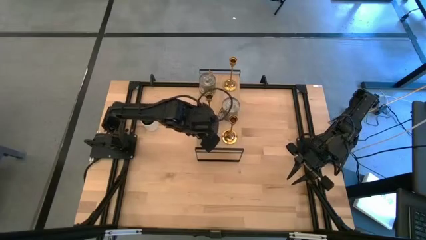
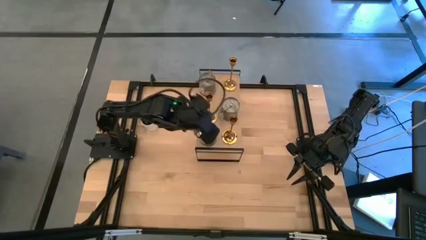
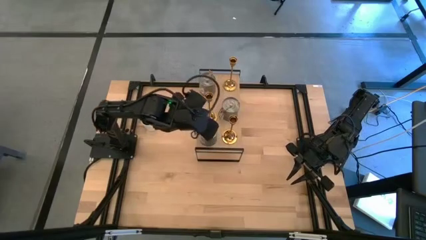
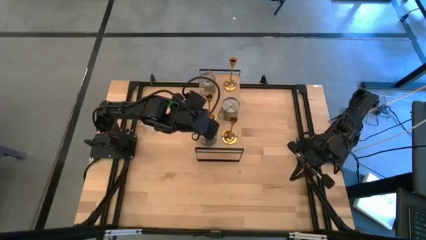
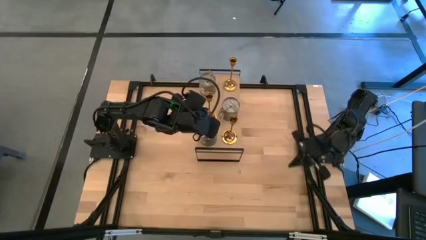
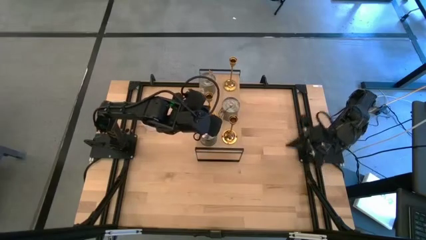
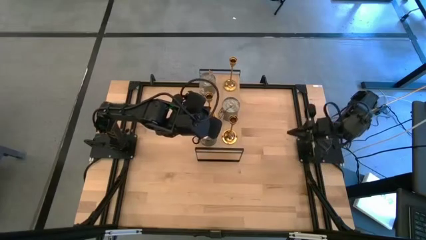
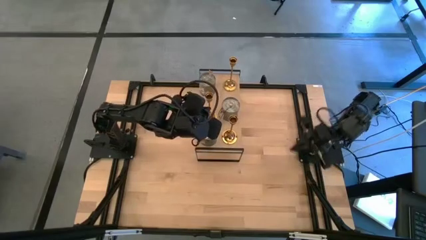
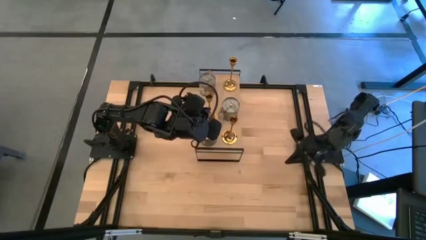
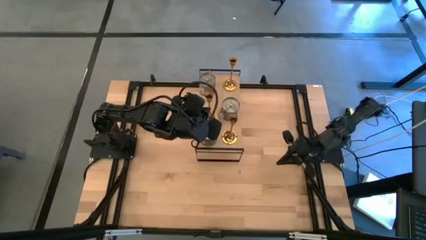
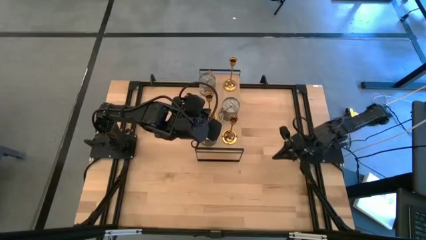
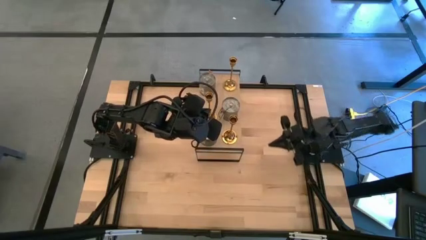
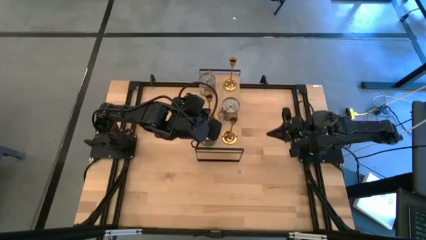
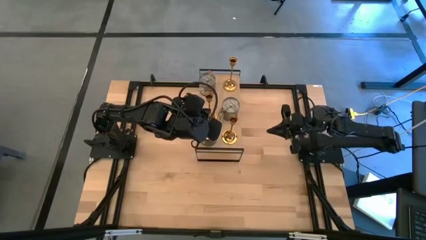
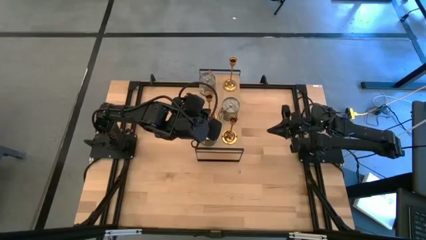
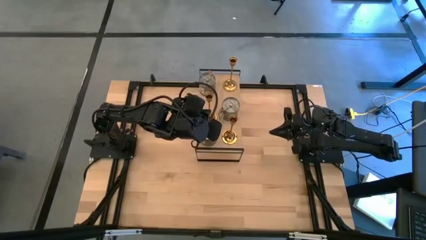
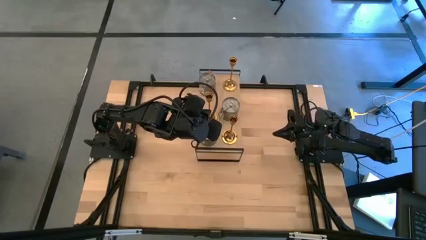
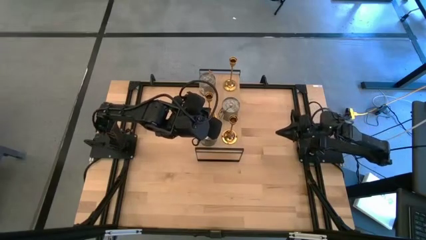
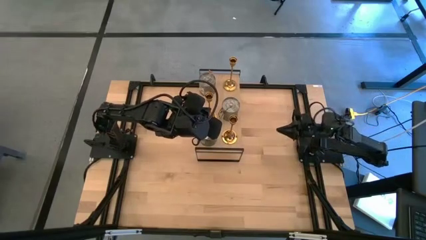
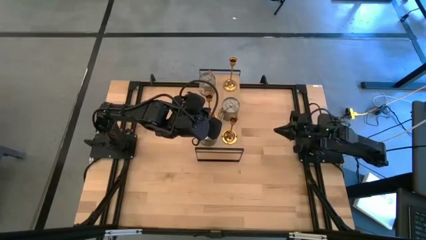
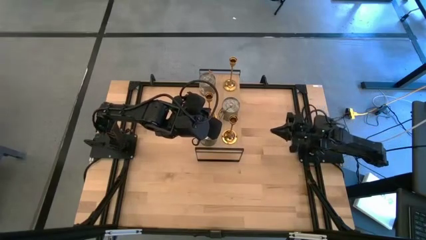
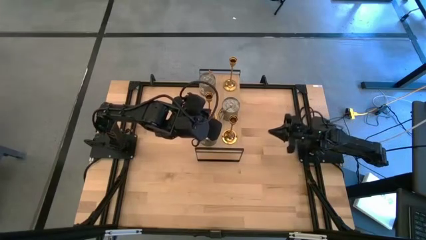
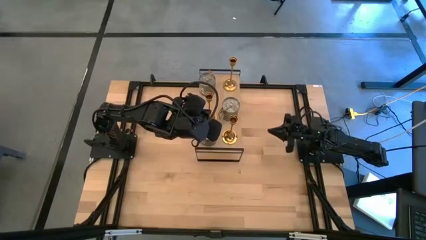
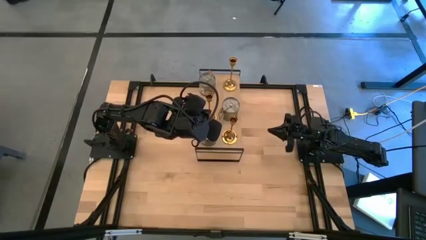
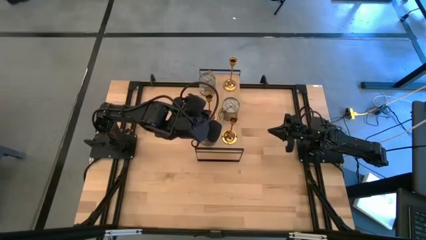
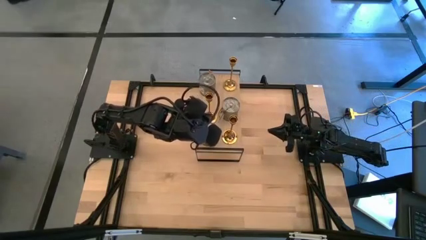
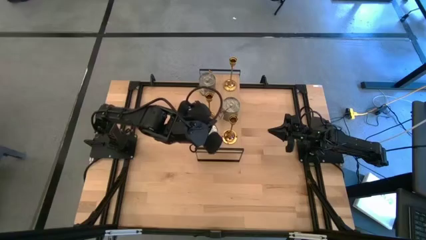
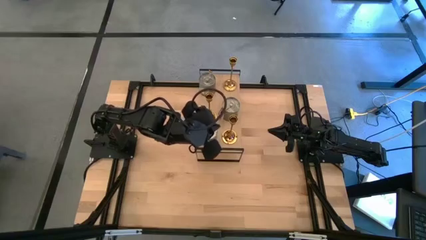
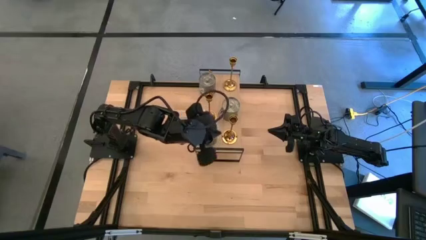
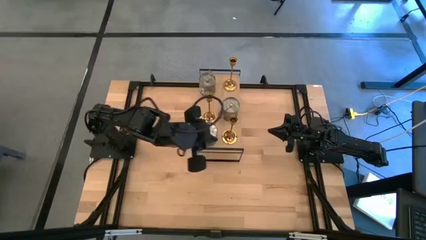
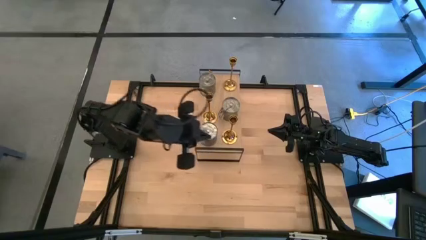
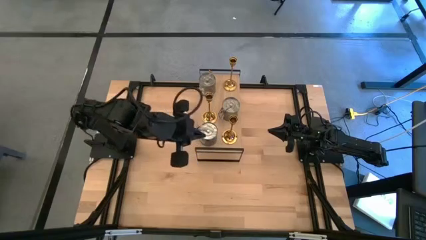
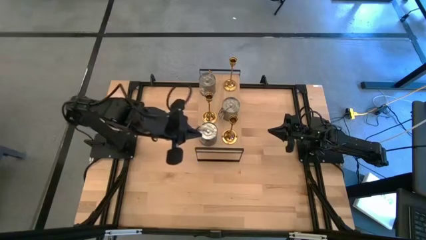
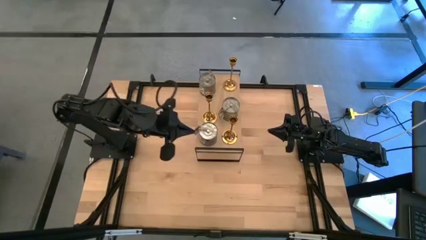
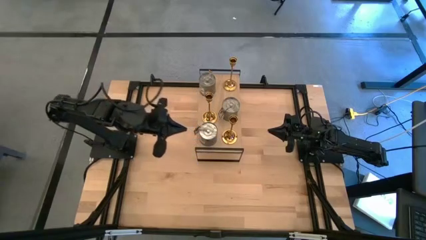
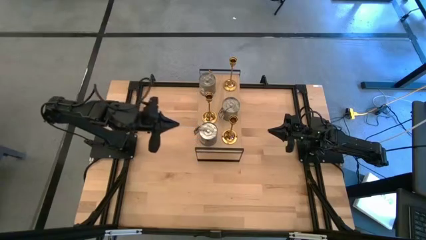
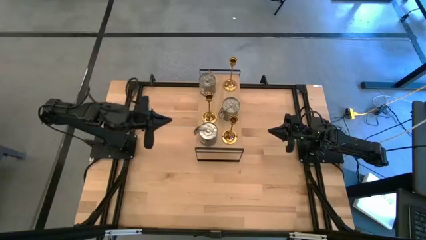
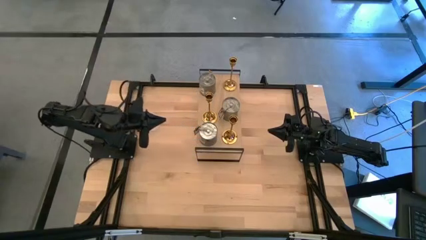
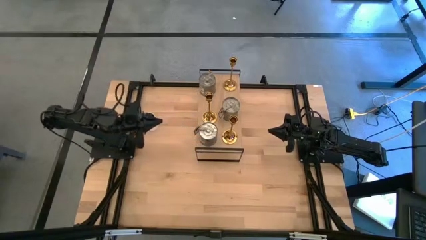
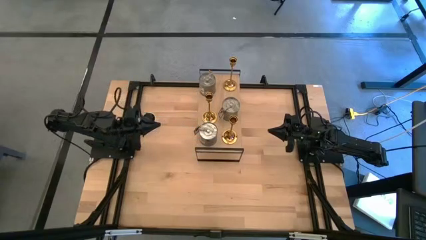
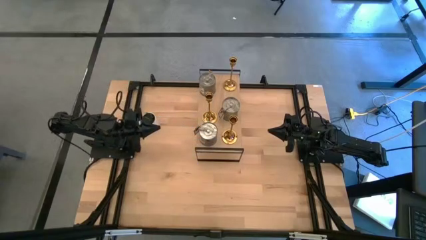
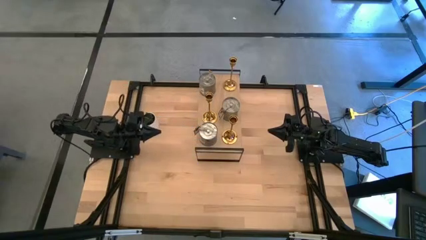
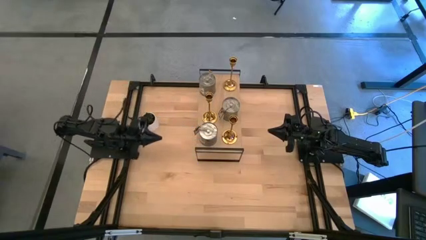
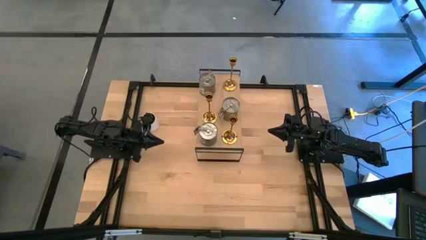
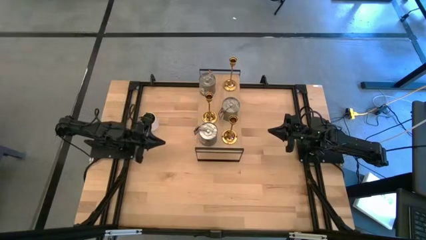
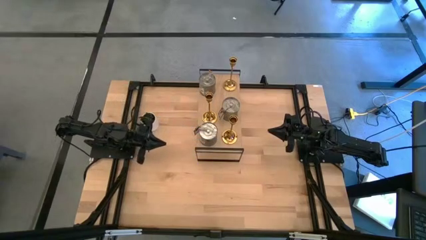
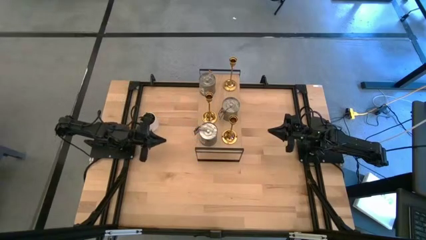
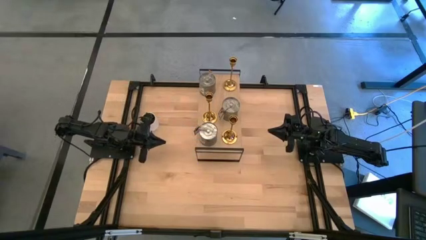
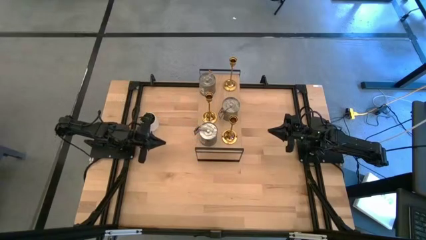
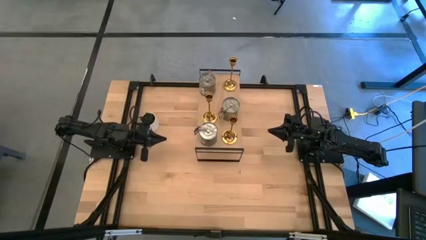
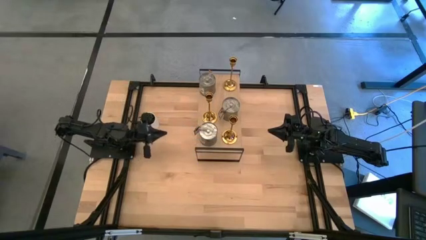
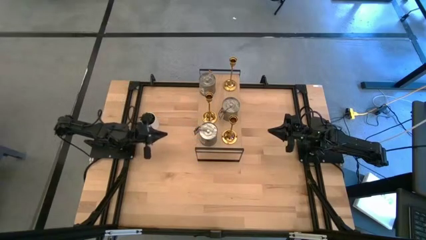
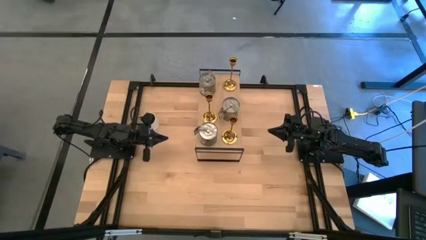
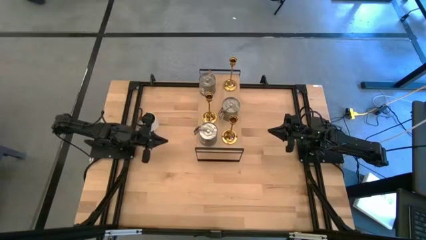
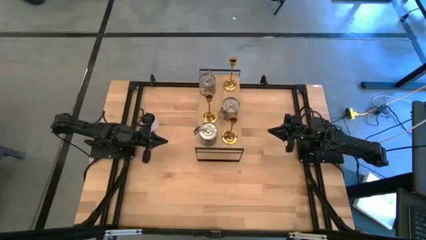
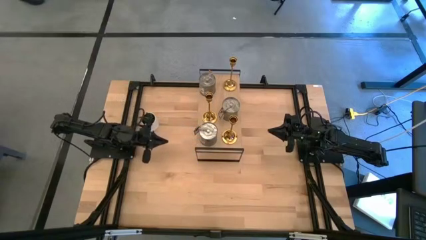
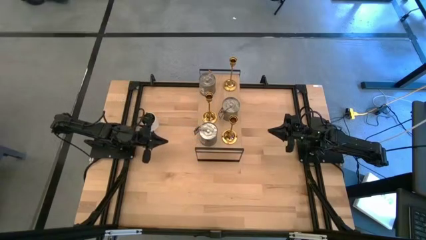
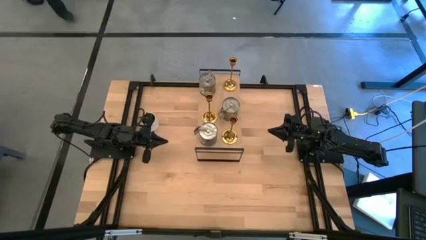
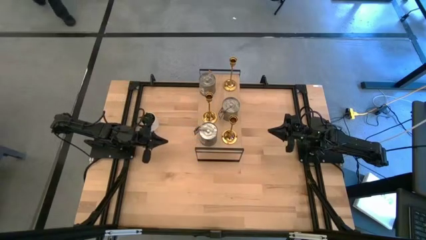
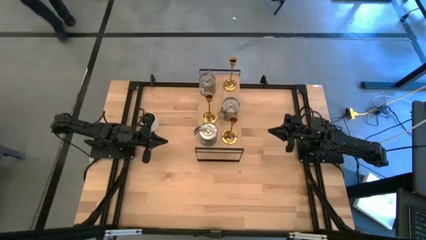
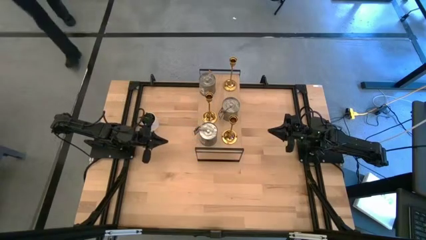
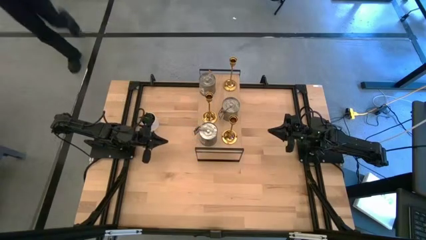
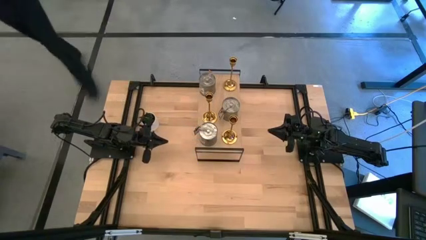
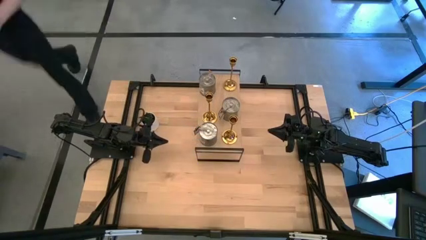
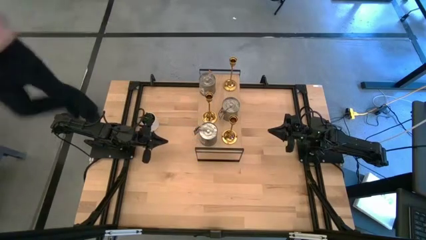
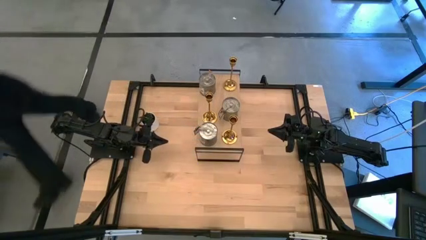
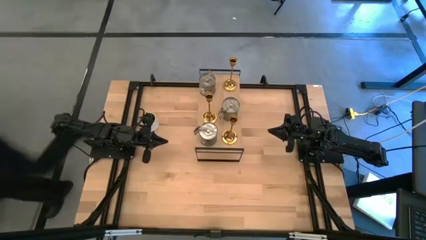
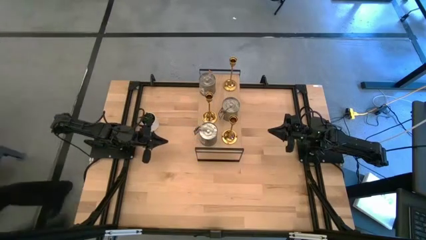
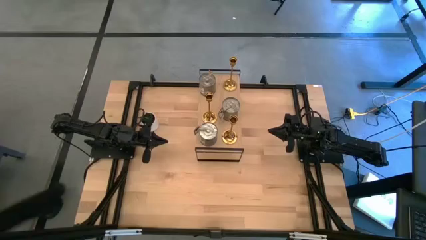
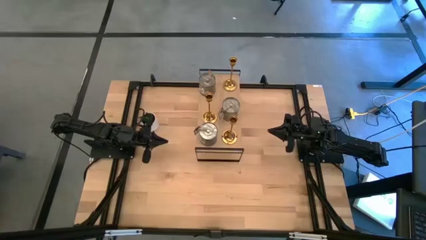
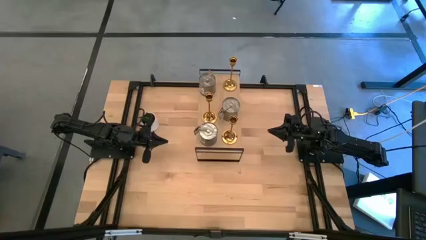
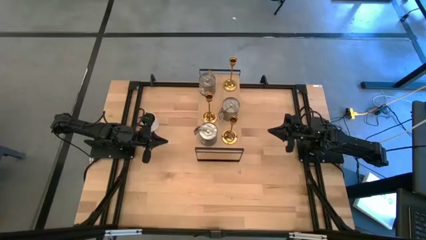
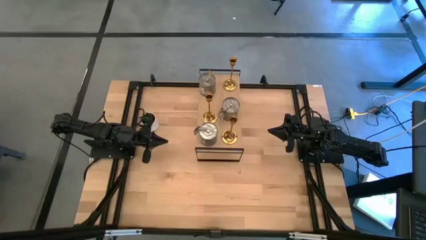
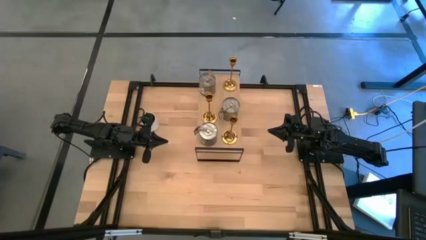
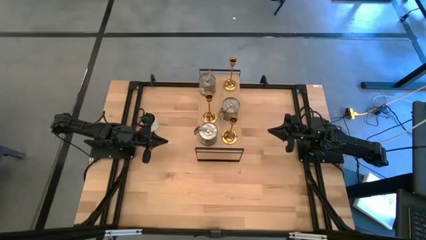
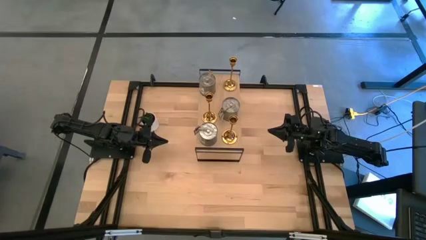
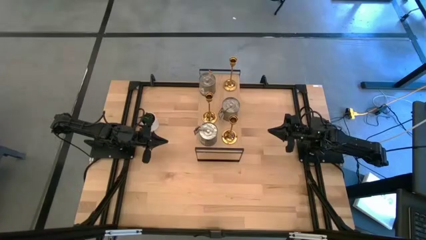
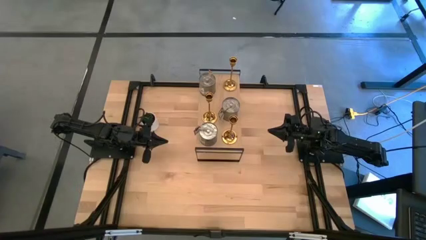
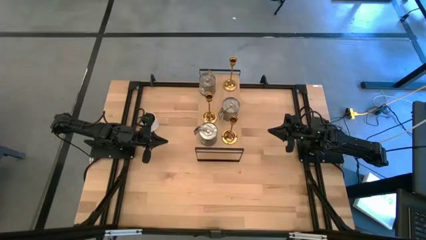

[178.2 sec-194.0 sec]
Task: Pick & Place candle stick holders
Return to Home Position
